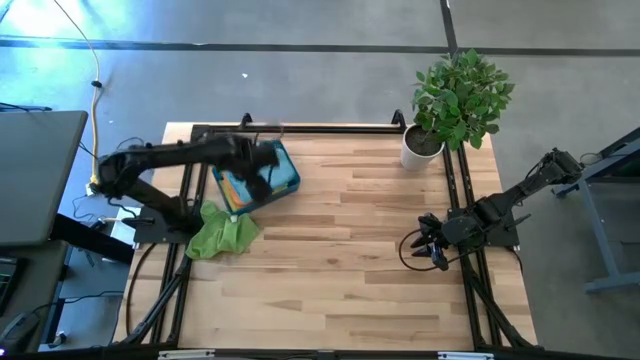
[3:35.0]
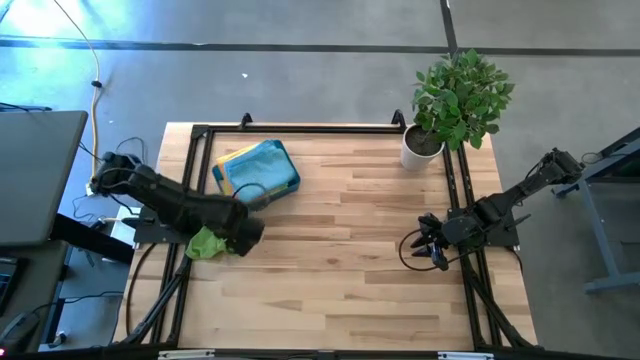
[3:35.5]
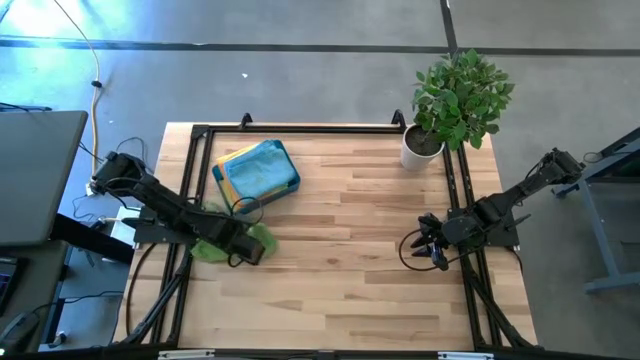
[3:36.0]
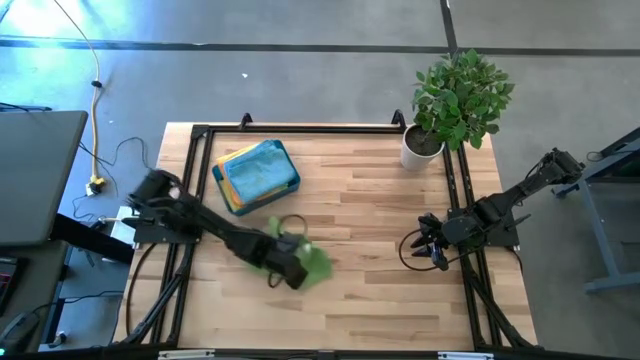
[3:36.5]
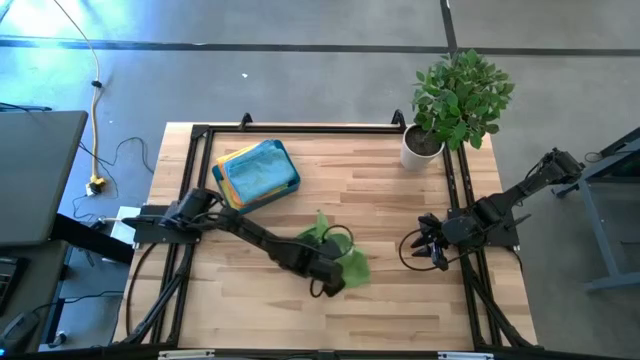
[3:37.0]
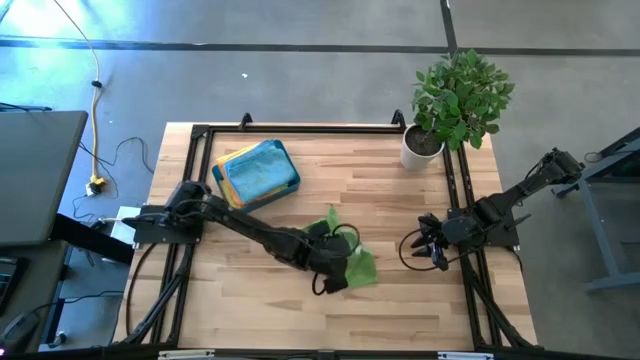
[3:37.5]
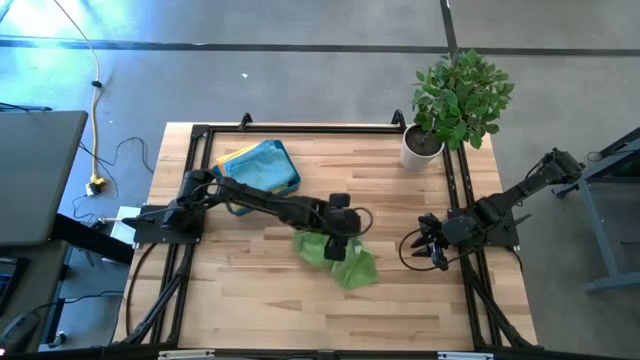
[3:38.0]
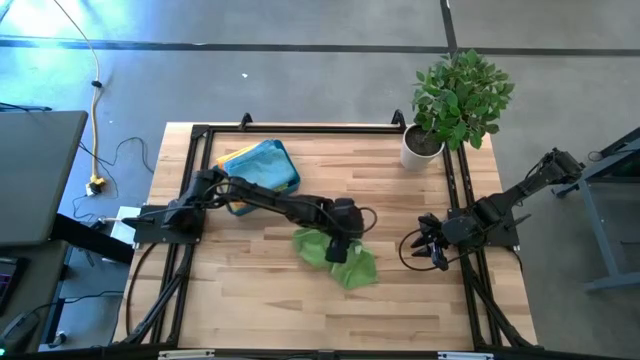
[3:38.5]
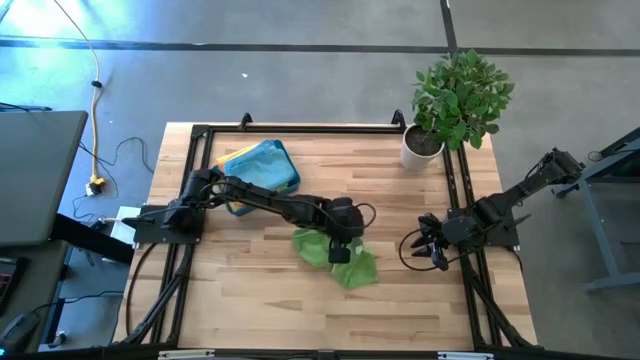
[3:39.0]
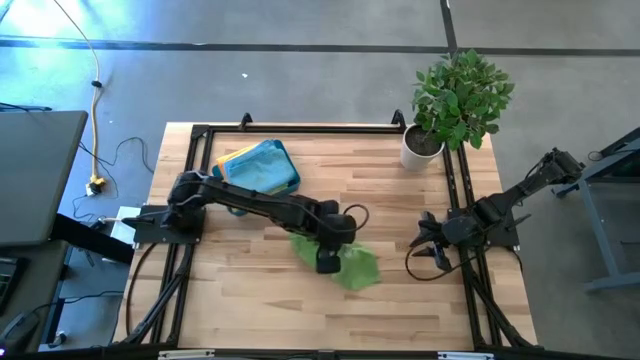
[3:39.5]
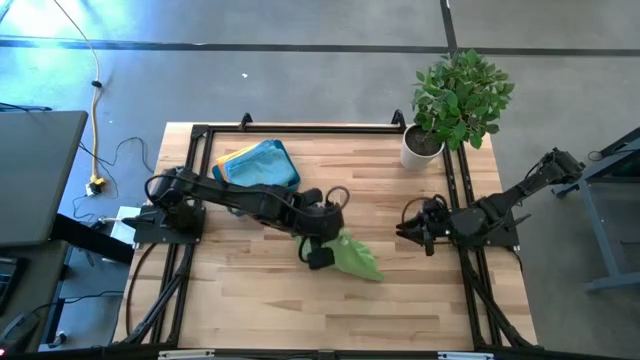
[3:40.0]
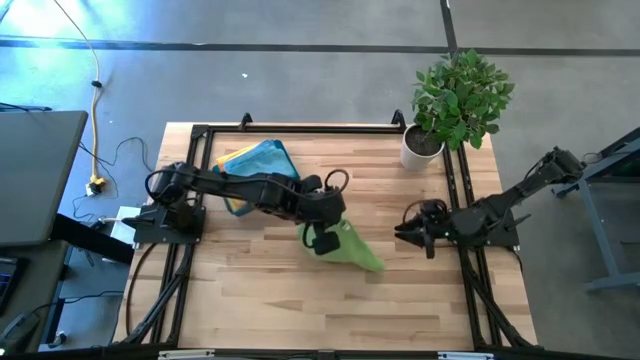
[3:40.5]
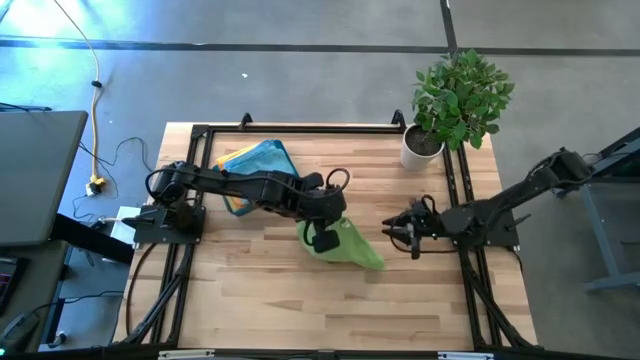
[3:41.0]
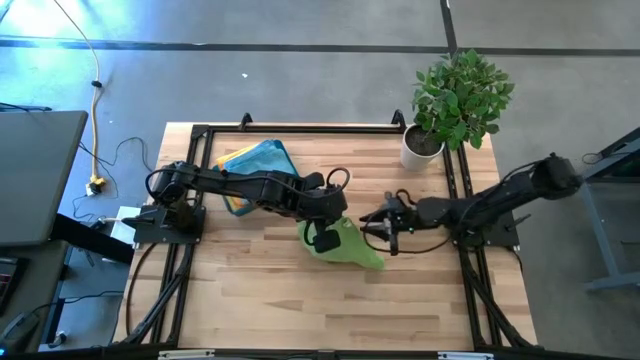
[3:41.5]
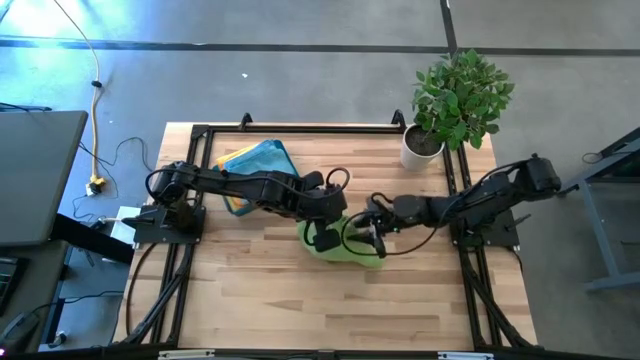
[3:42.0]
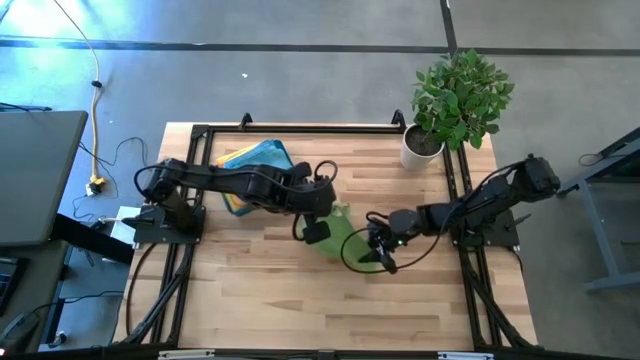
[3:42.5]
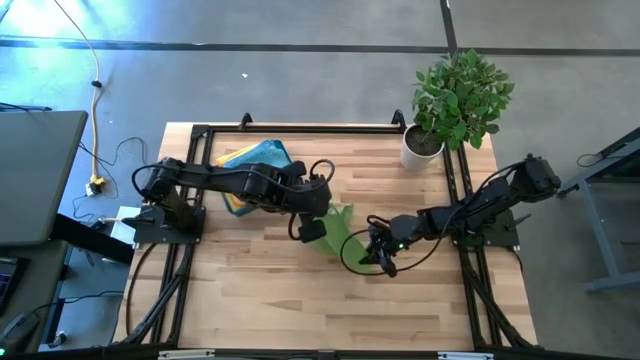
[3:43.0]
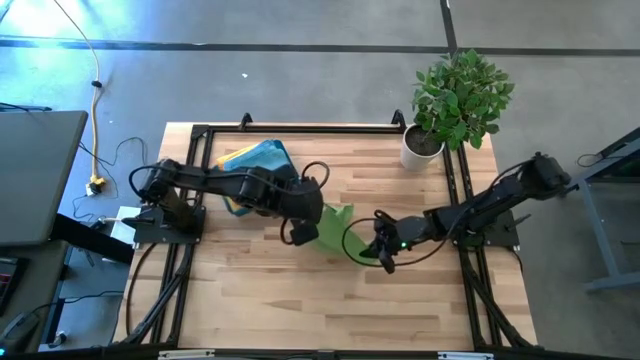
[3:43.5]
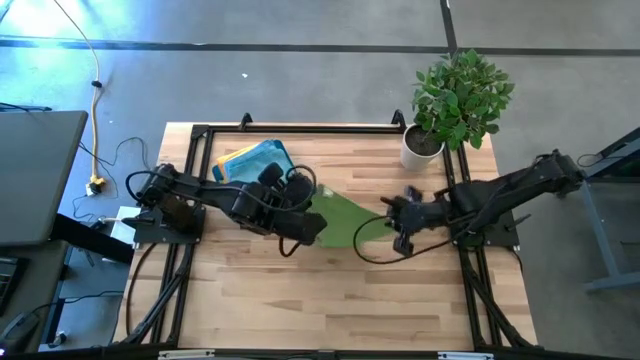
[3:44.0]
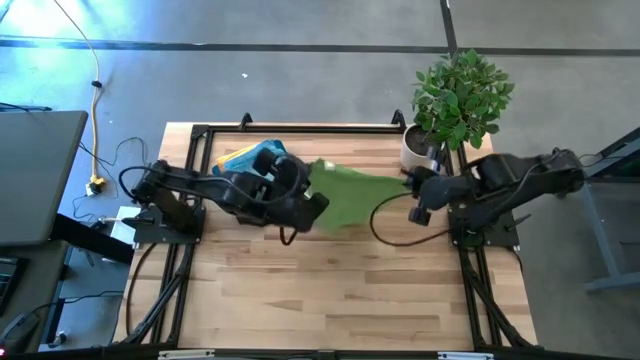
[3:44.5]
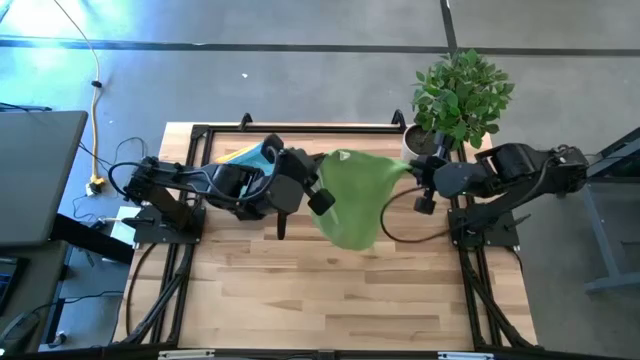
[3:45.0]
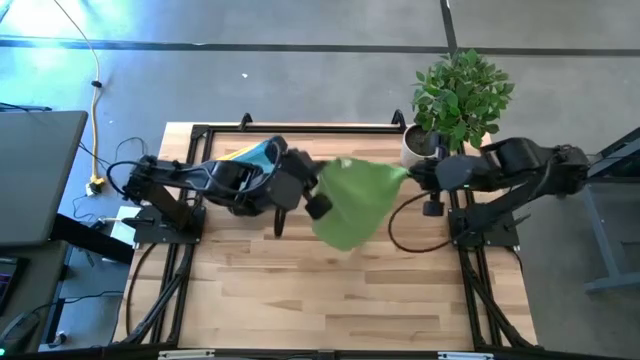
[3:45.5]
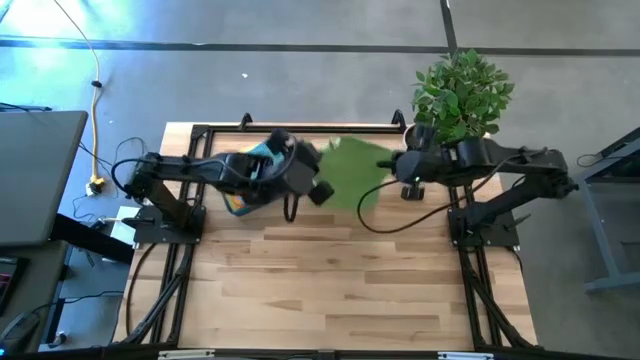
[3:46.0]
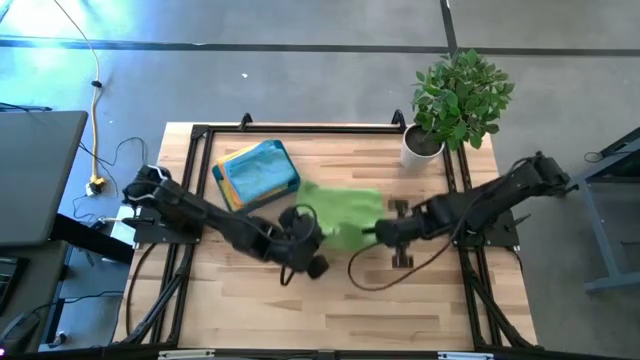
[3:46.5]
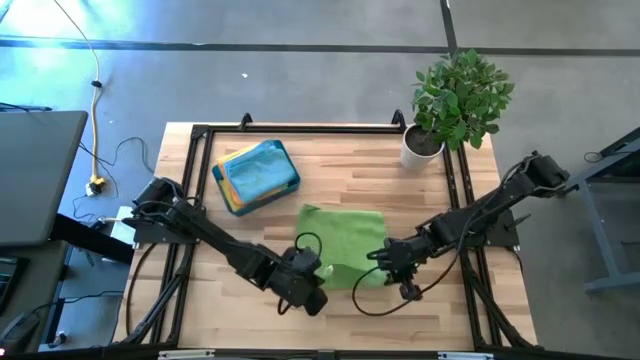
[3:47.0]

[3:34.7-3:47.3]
Task: Fold microfiber towels
Fold the green microfiber cloth

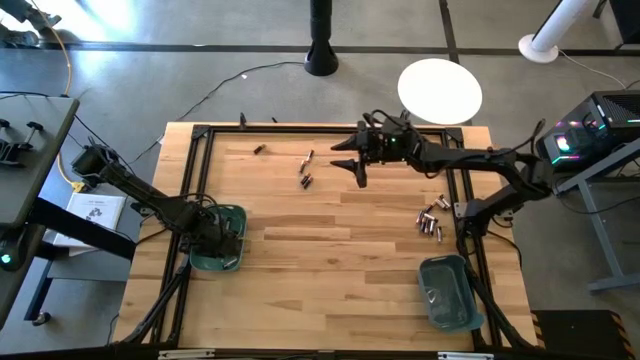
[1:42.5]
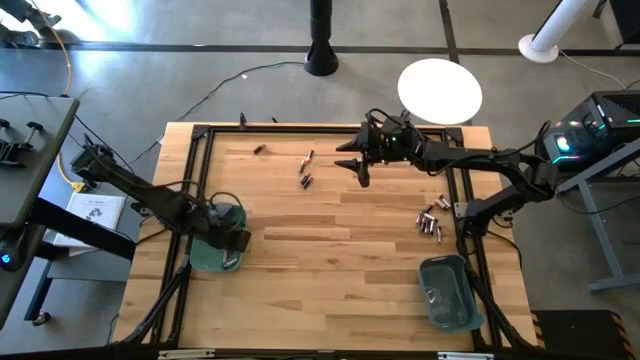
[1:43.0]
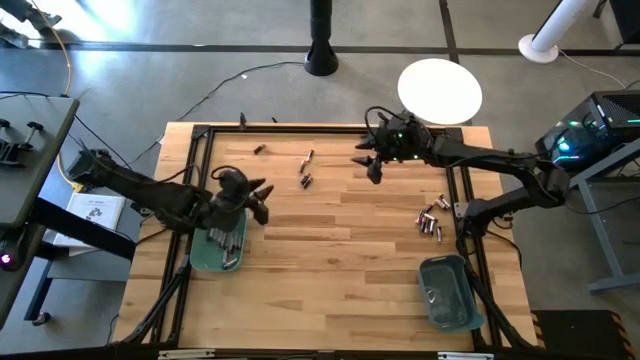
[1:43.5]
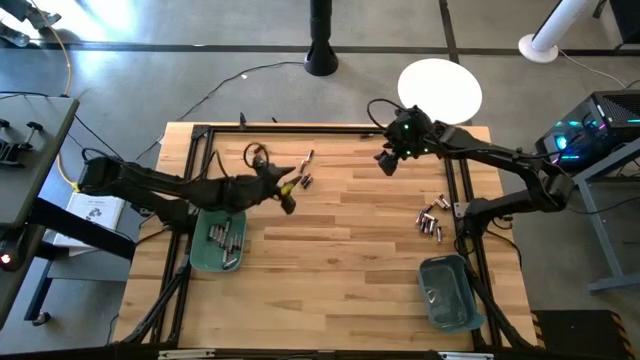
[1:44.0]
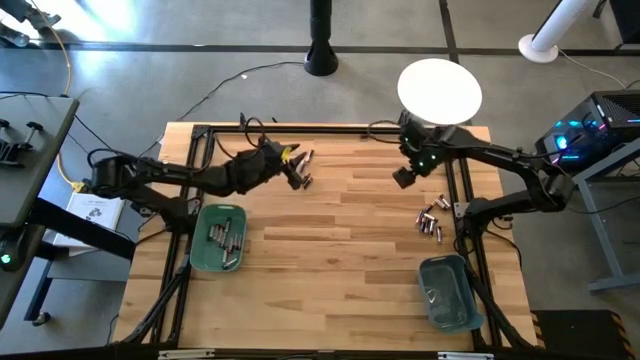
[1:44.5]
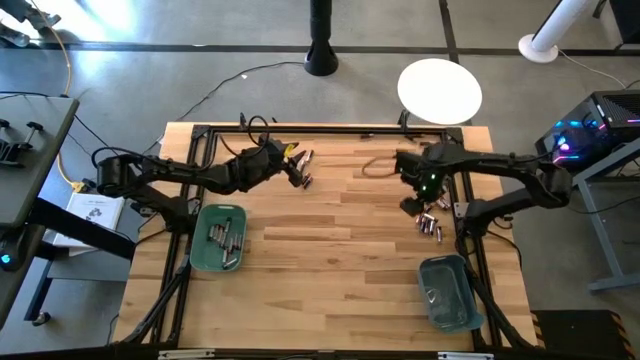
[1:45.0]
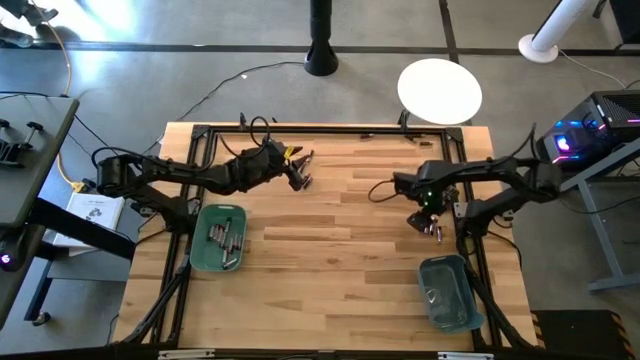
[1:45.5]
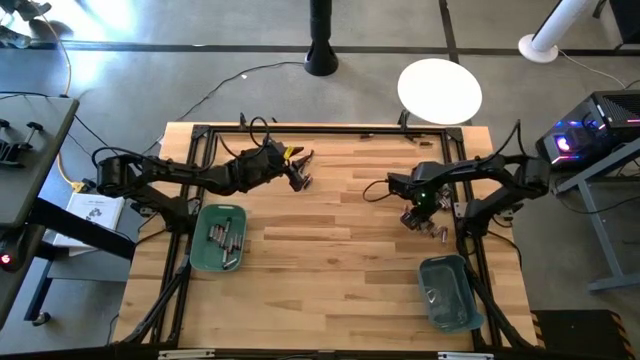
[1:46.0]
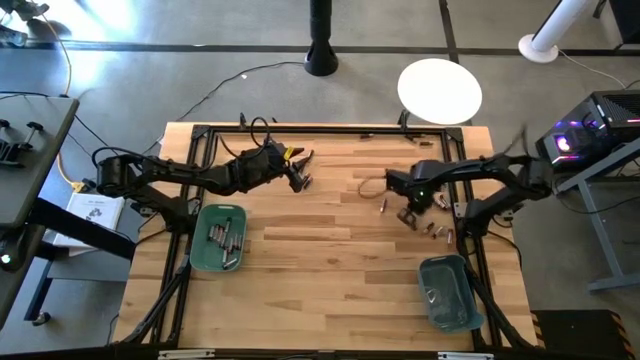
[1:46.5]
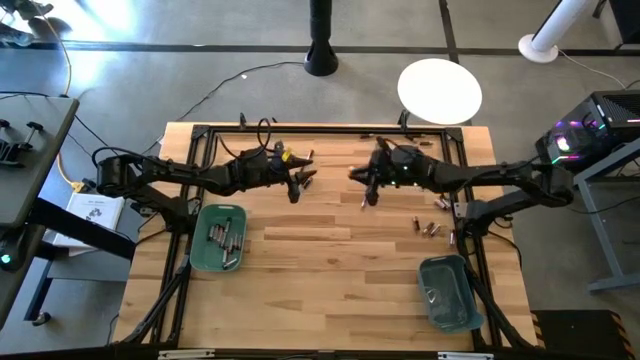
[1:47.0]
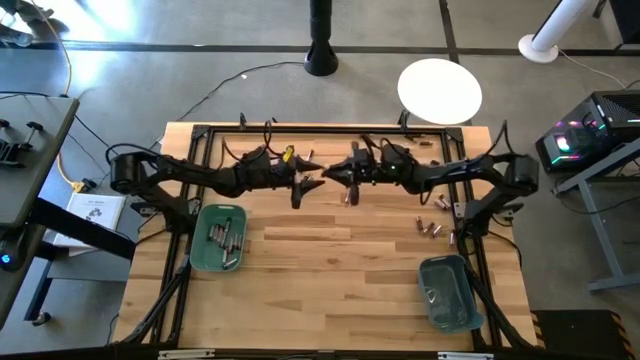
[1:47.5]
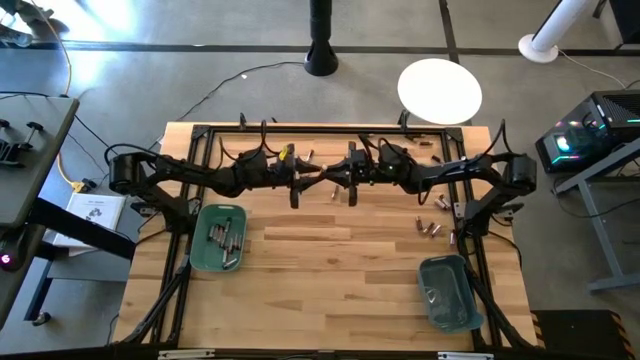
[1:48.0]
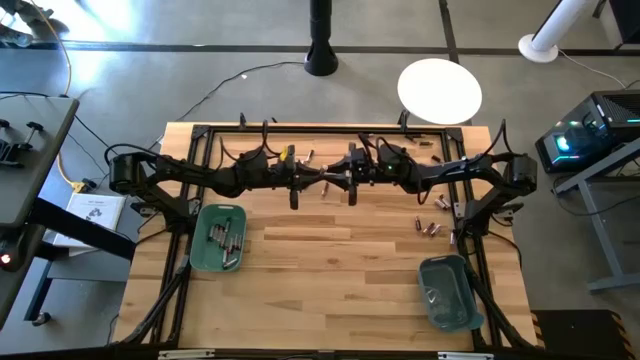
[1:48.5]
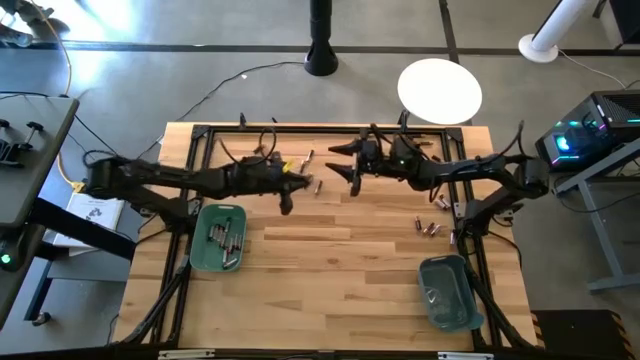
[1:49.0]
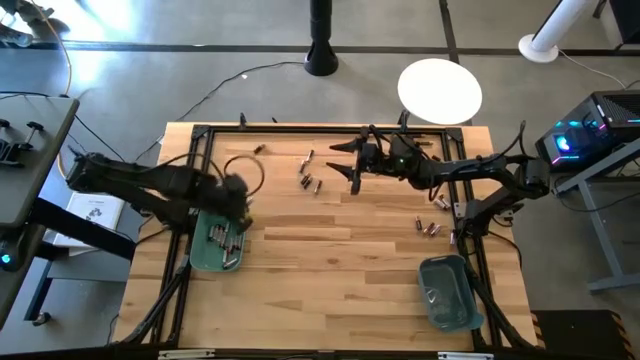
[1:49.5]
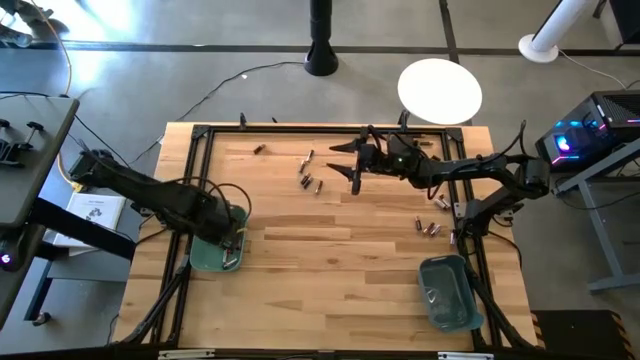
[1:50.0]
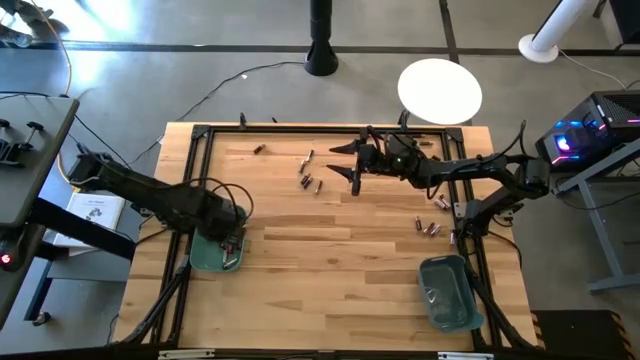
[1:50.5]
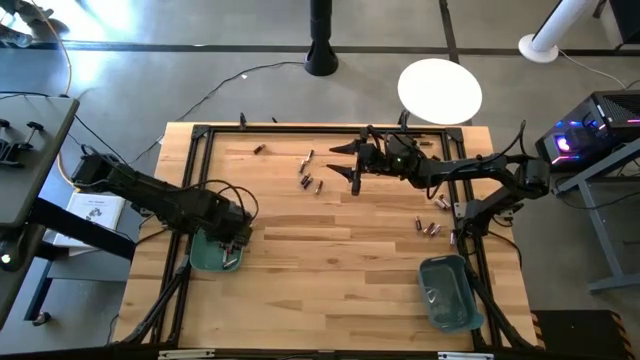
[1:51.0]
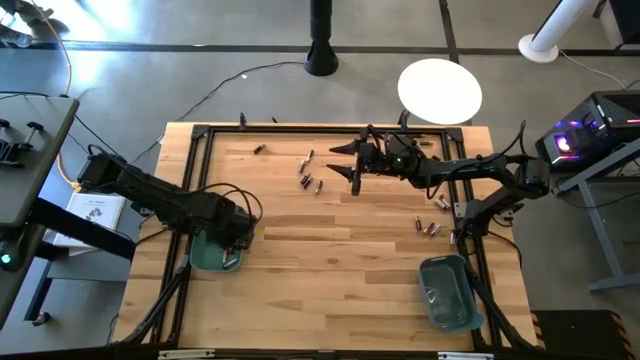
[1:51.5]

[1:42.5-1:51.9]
Task: Sort batteries
Put the silver battery into the green bin
